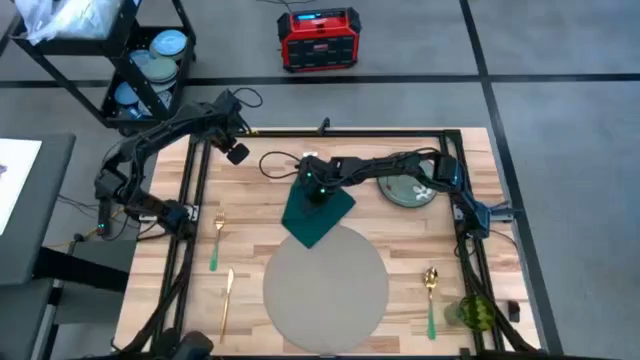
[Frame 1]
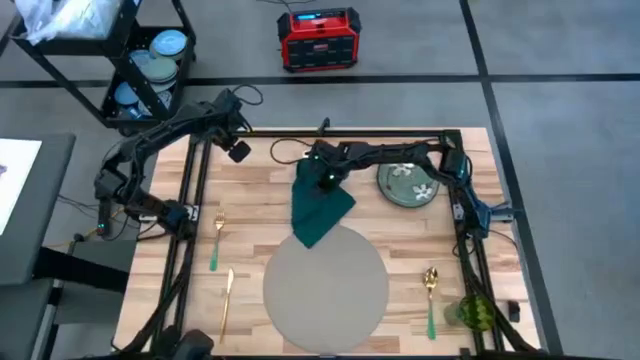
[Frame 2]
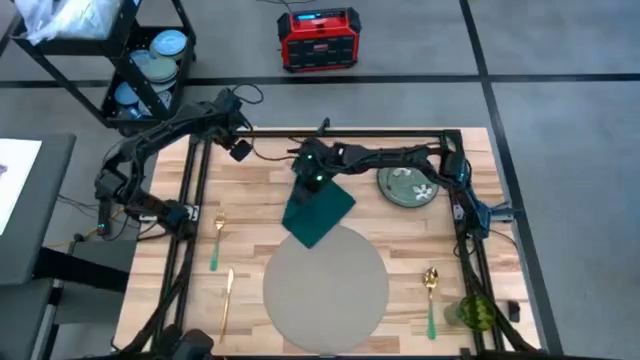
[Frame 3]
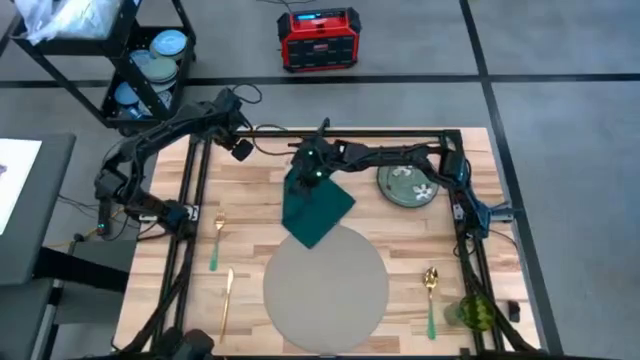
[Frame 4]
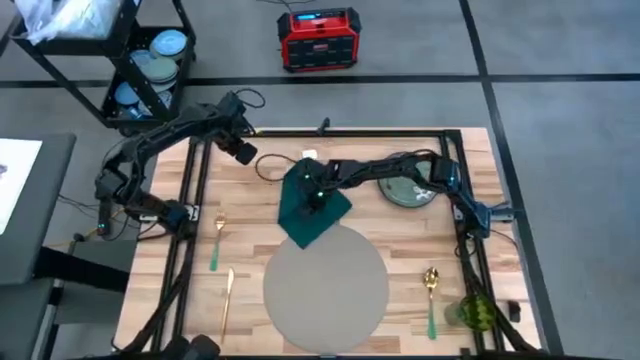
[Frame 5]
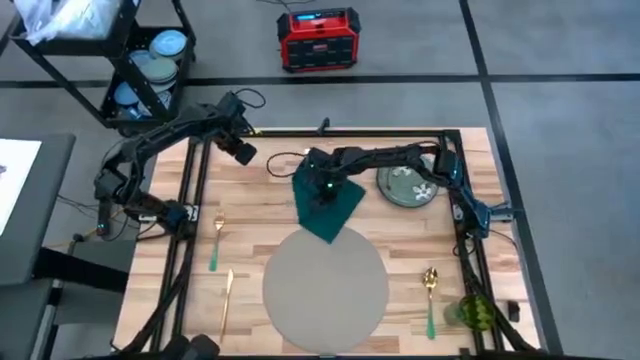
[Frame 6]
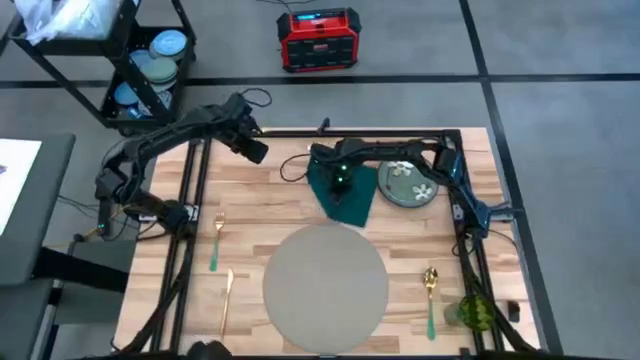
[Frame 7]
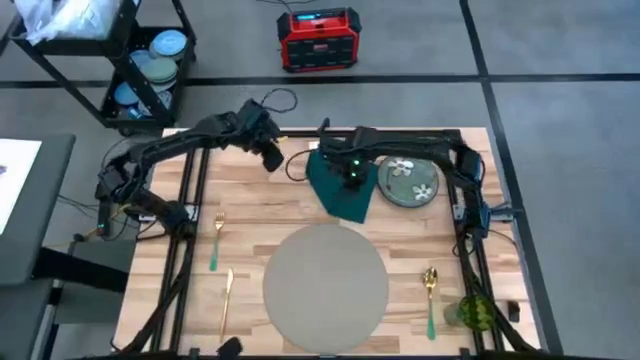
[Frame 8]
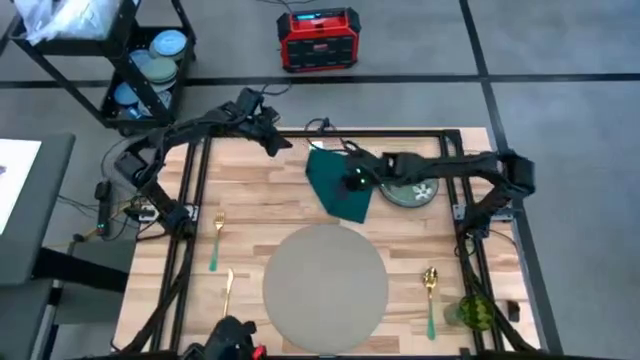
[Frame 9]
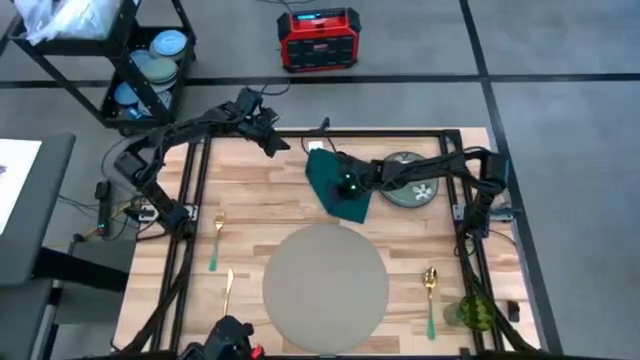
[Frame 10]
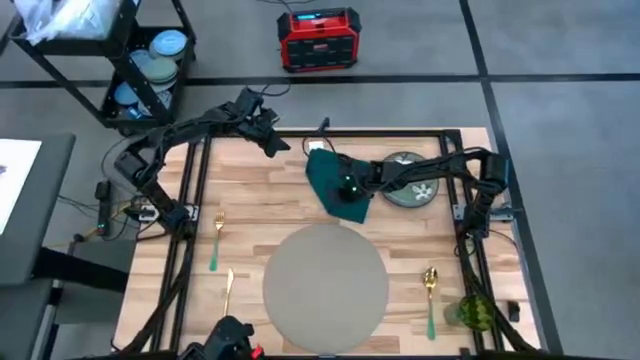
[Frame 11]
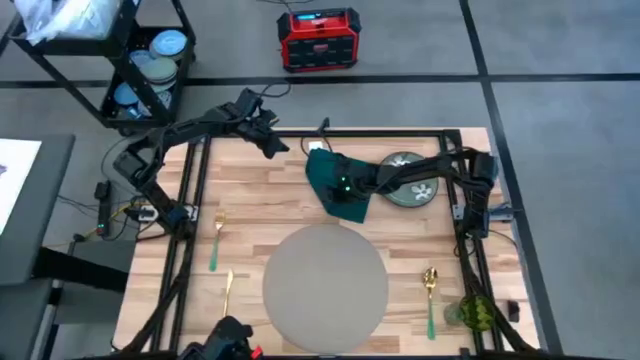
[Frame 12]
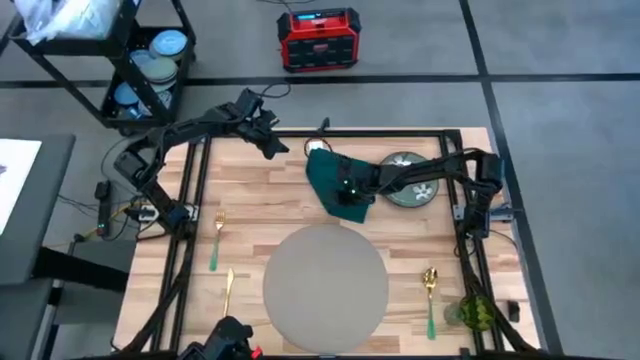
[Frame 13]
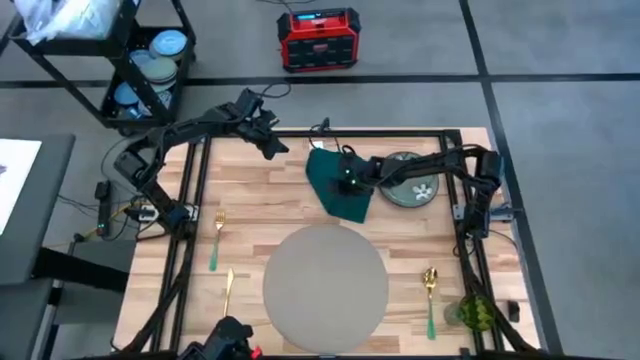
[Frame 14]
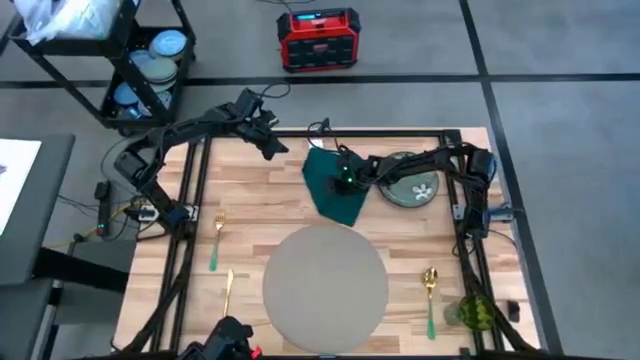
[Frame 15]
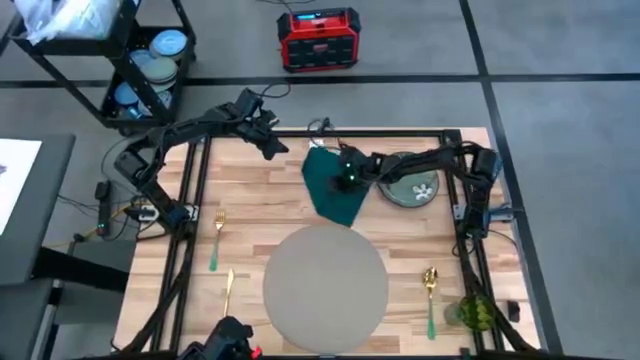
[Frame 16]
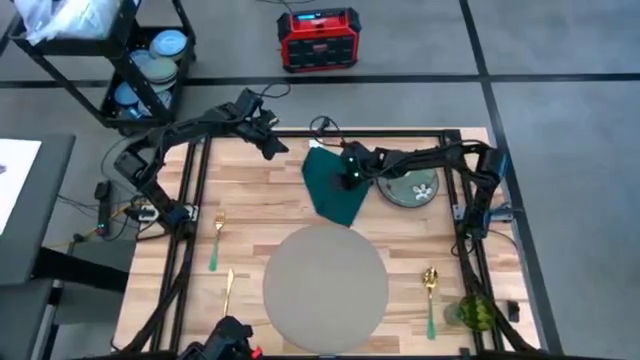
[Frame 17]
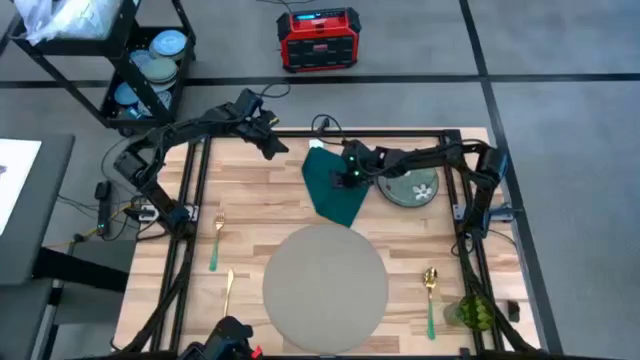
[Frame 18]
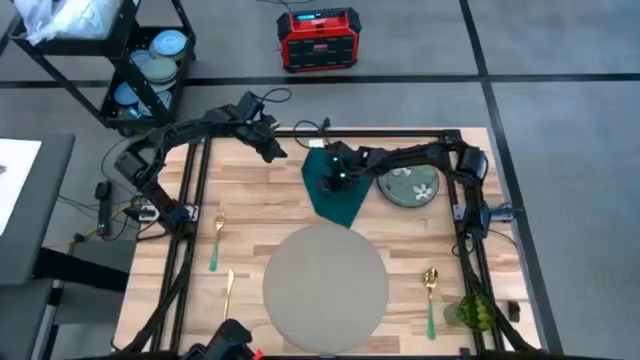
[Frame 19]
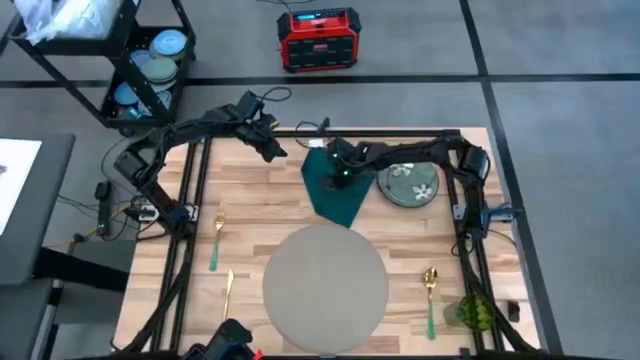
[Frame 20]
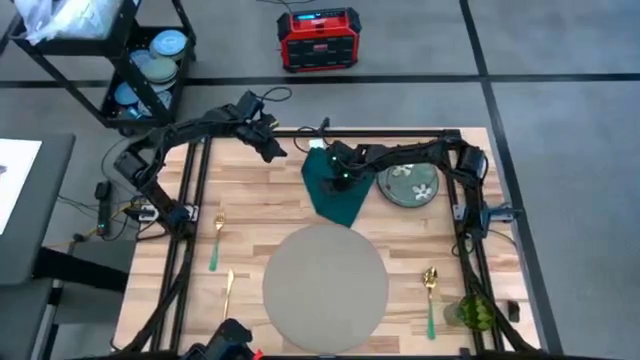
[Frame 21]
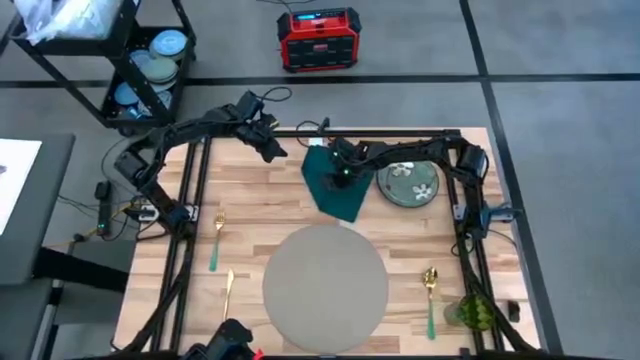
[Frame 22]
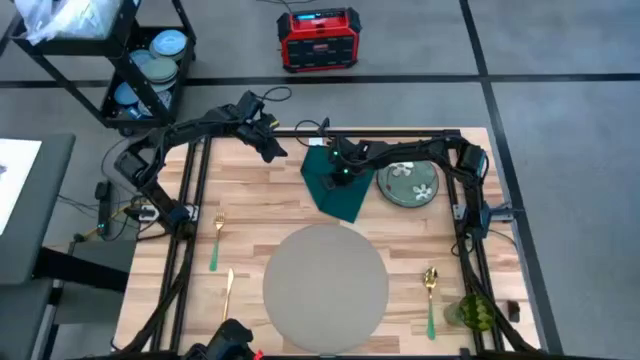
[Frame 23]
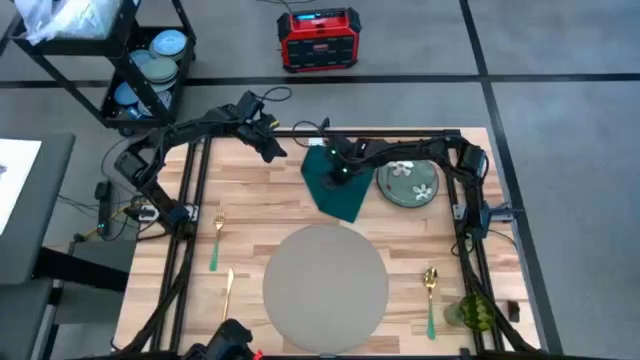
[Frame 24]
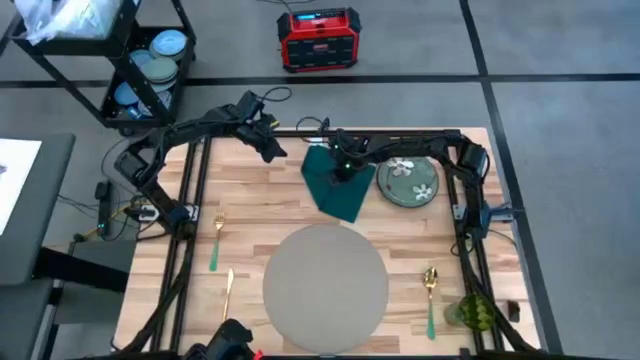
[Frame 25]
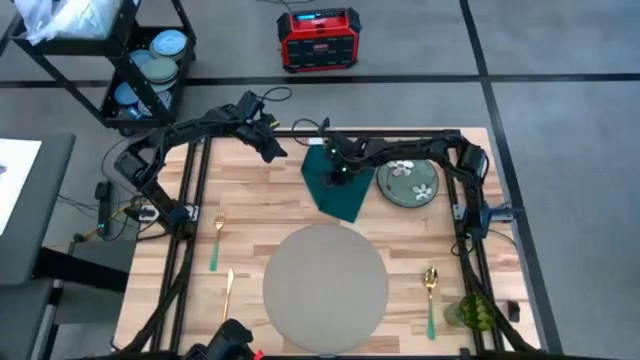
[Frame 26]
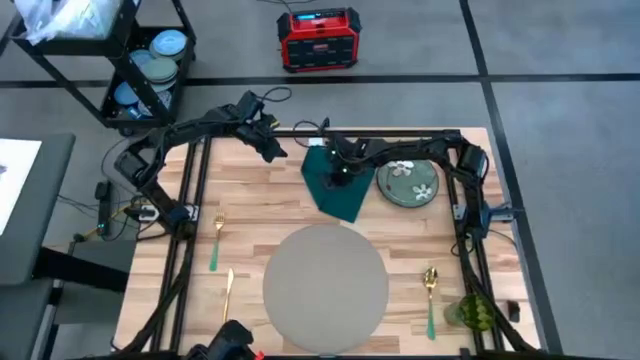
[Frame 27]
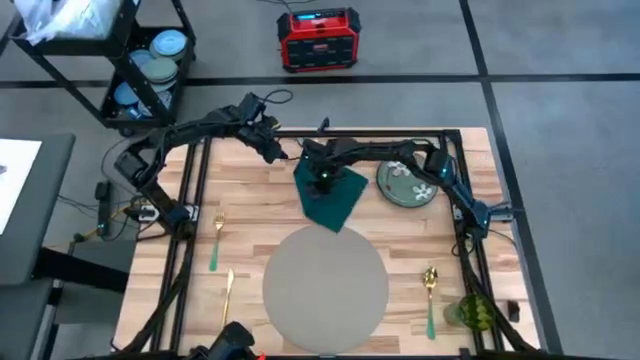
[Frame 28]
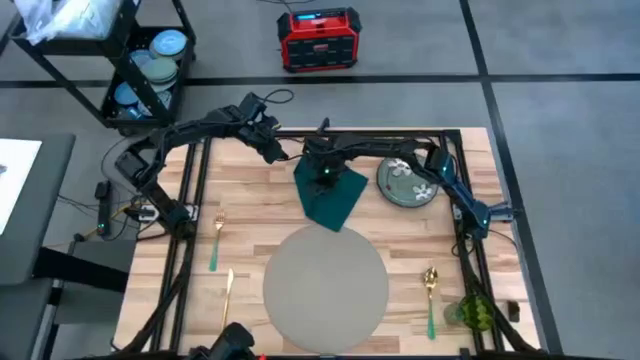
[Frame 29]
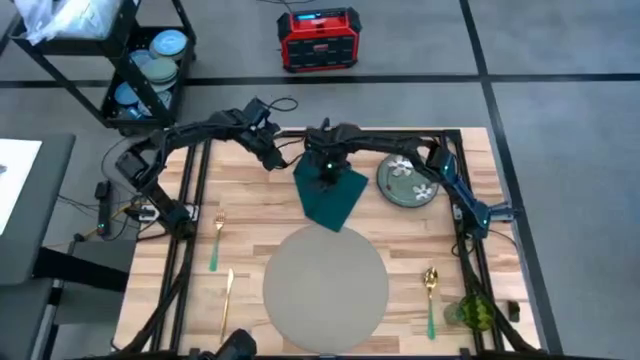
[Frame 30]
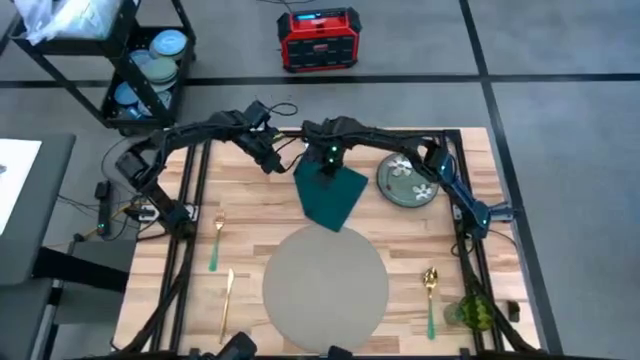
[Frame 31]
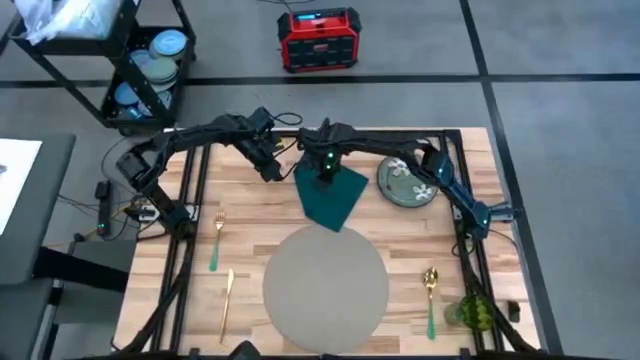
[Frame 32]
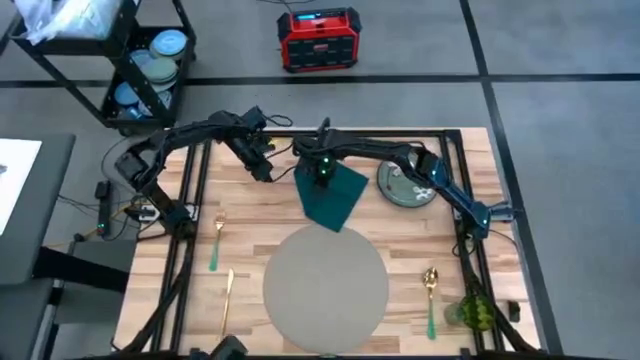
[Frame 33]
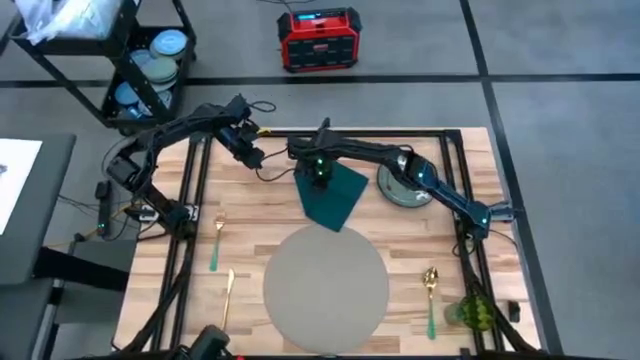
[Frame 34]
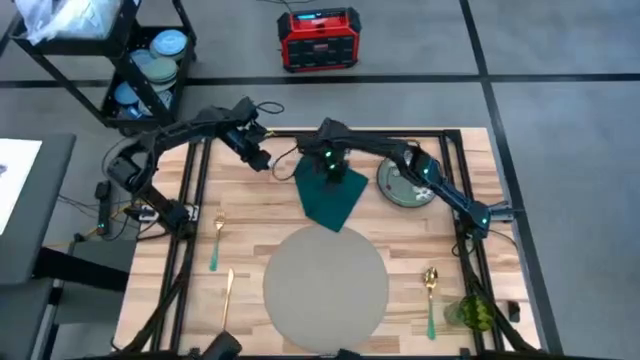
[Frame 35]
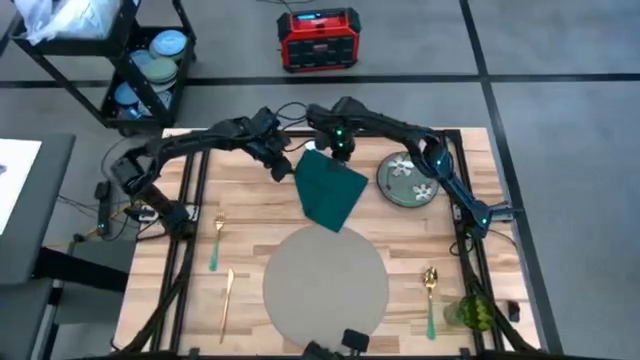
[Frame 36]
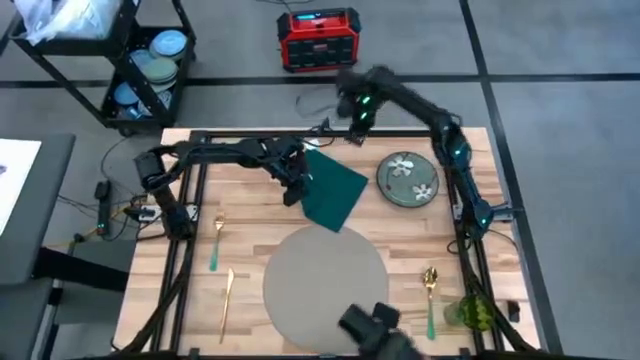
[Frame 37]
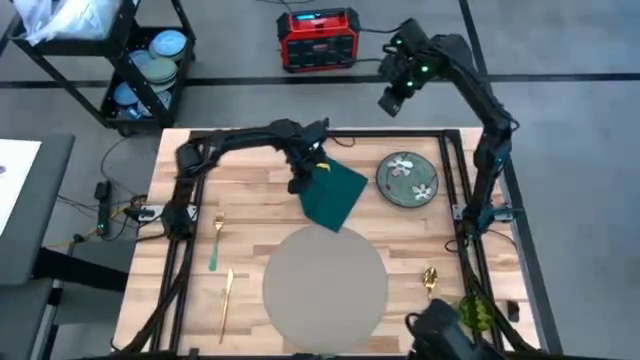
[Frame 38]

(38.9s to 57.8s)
Task: Set table place
Fold the green napkin

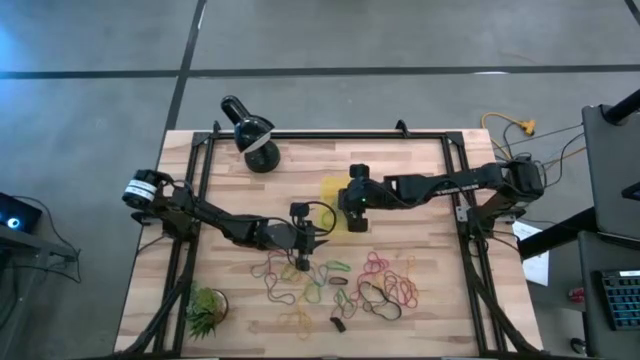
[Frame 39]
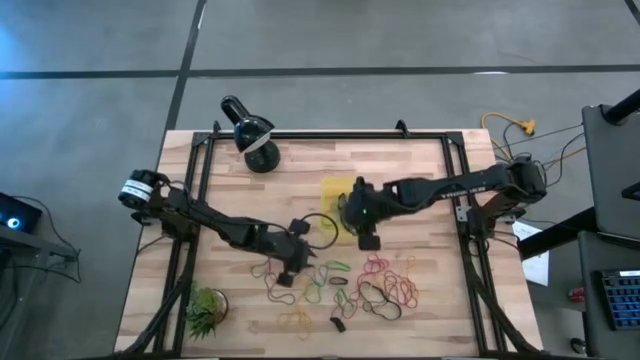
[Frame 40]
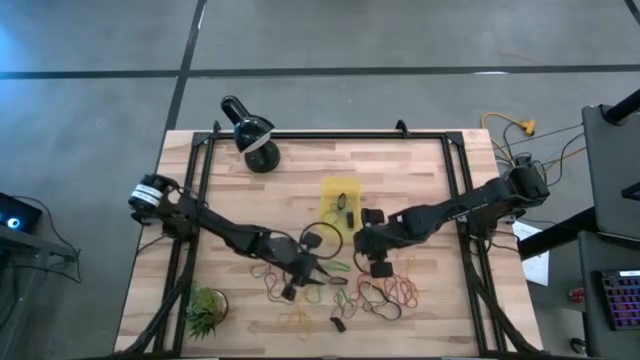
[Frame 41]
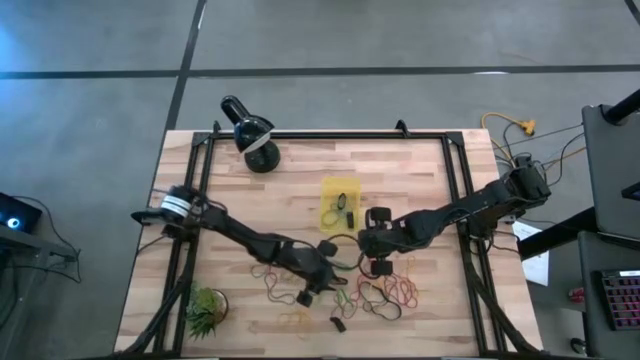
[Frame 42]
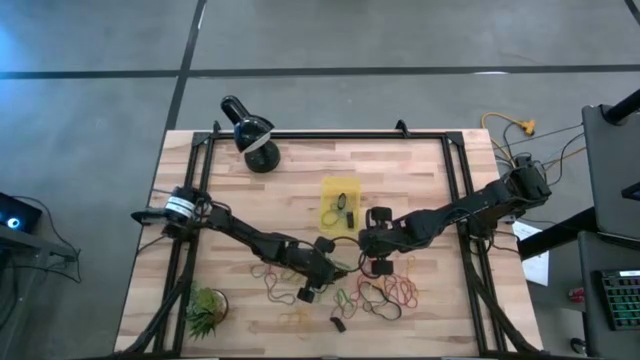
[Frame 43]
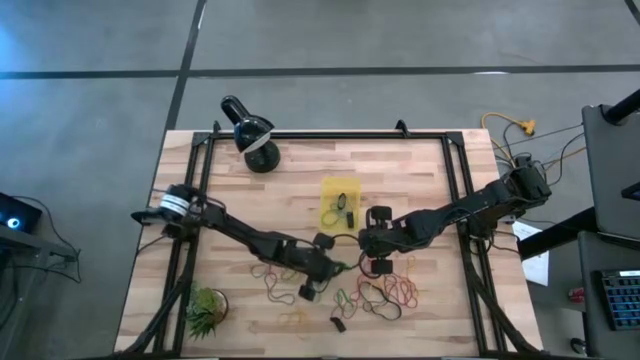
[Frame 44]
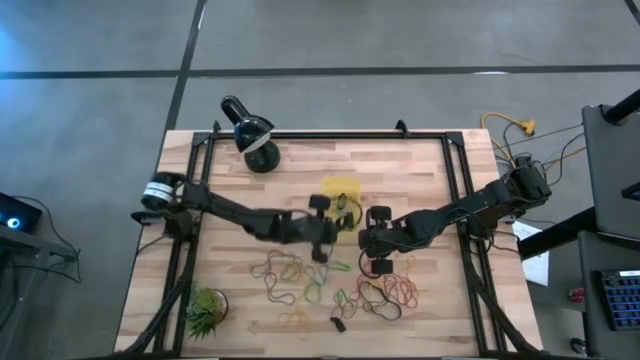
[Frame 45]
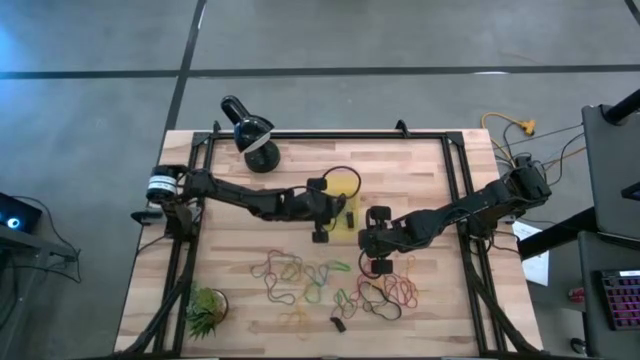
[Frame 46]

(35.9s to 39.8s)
Task: Pick and place rubber bands into bin
Put the black rubber band into the yellow bin
